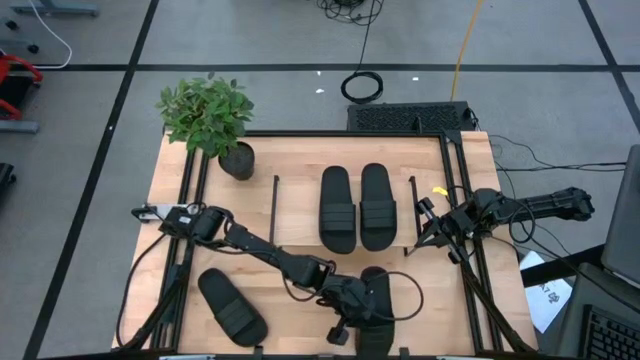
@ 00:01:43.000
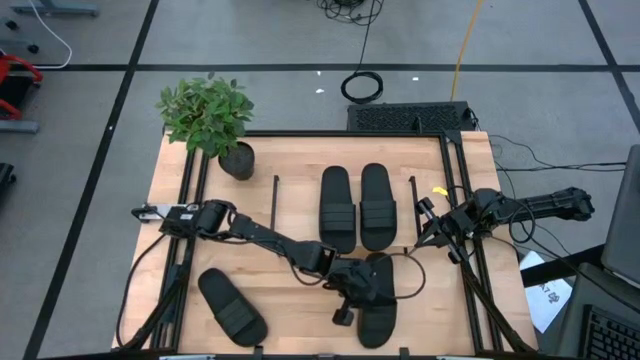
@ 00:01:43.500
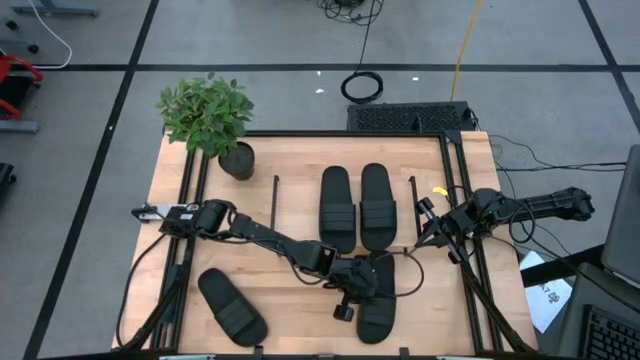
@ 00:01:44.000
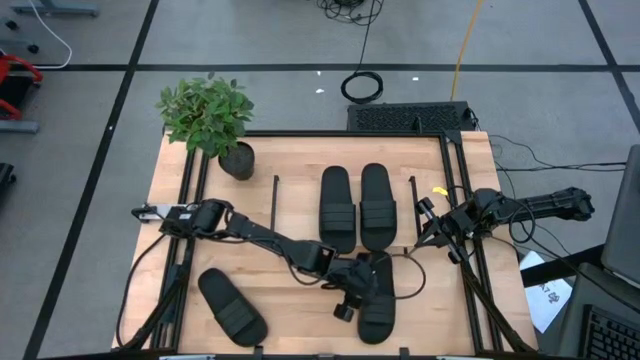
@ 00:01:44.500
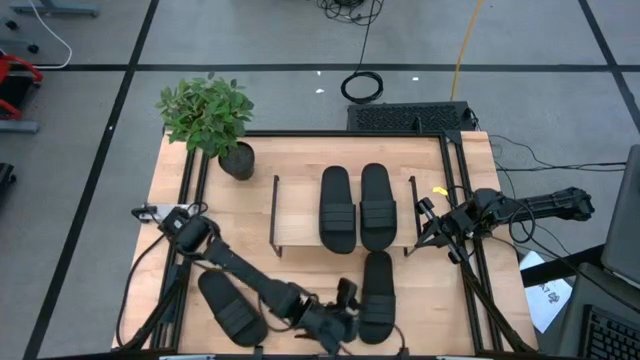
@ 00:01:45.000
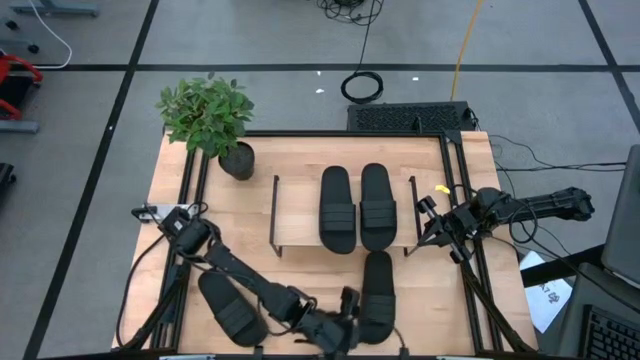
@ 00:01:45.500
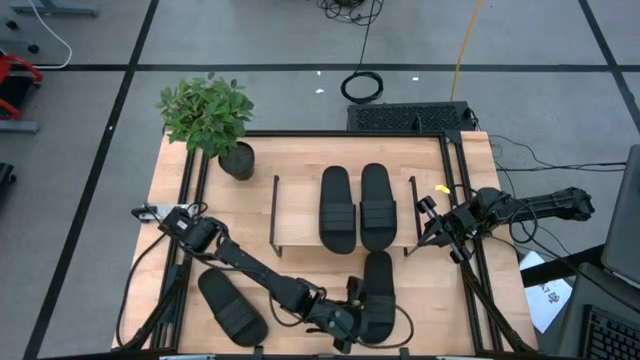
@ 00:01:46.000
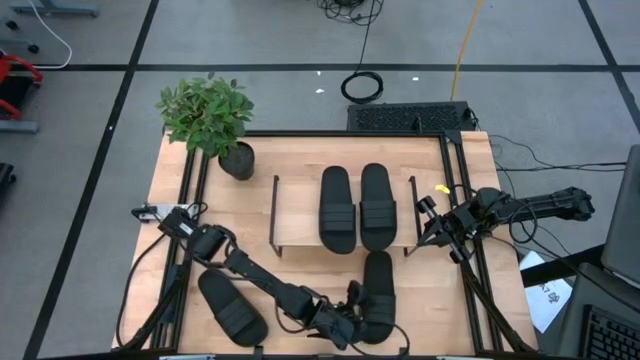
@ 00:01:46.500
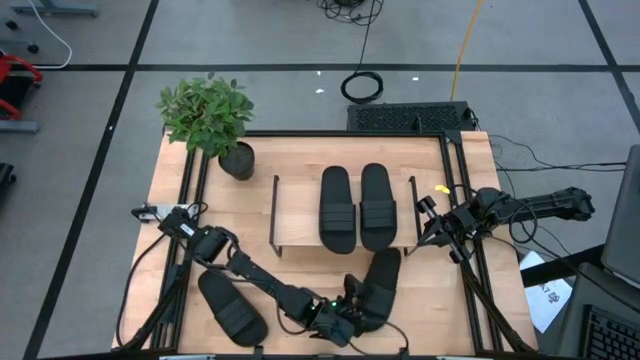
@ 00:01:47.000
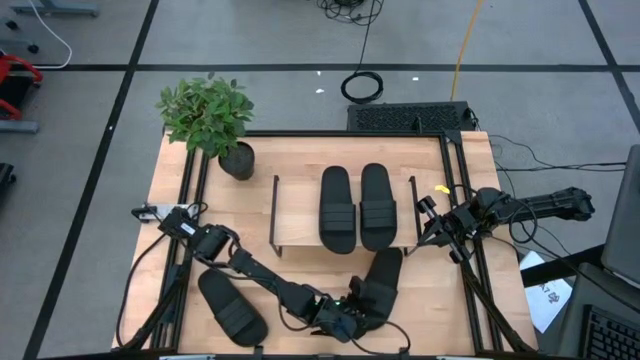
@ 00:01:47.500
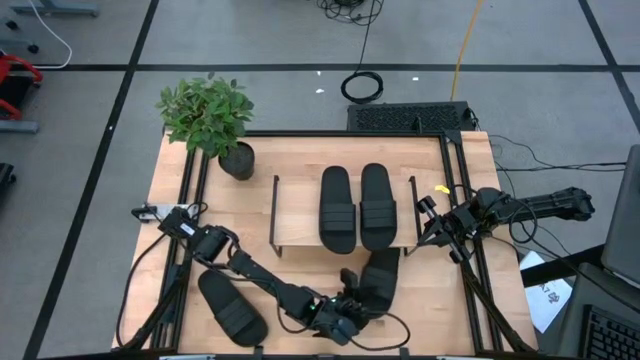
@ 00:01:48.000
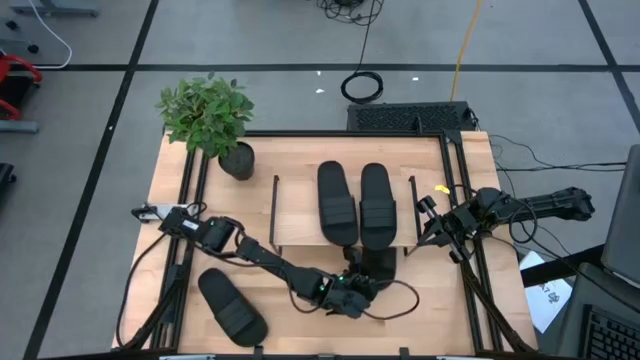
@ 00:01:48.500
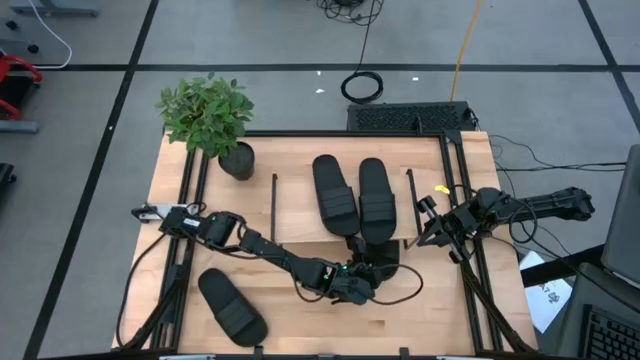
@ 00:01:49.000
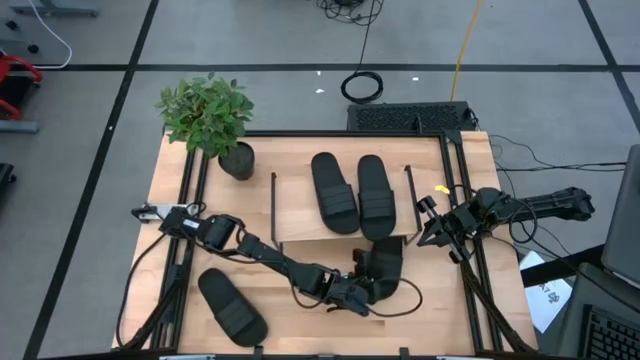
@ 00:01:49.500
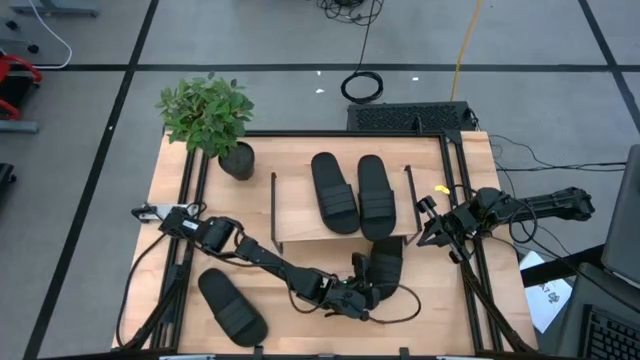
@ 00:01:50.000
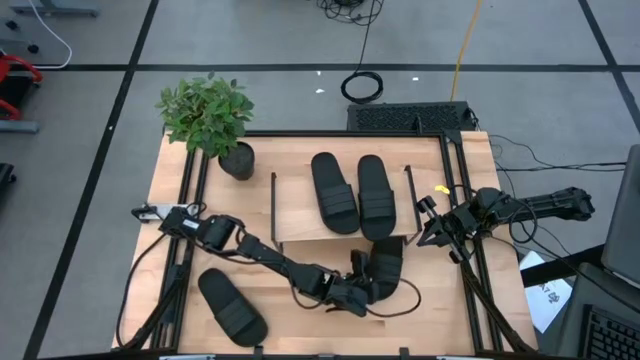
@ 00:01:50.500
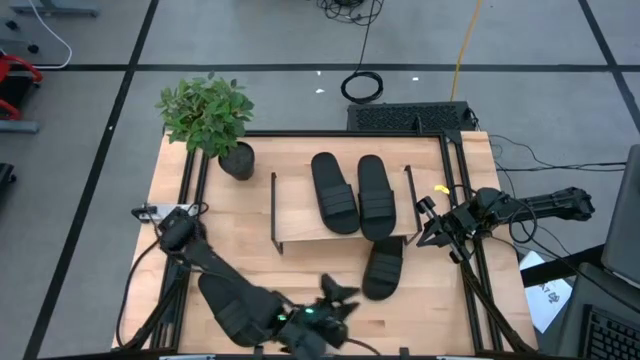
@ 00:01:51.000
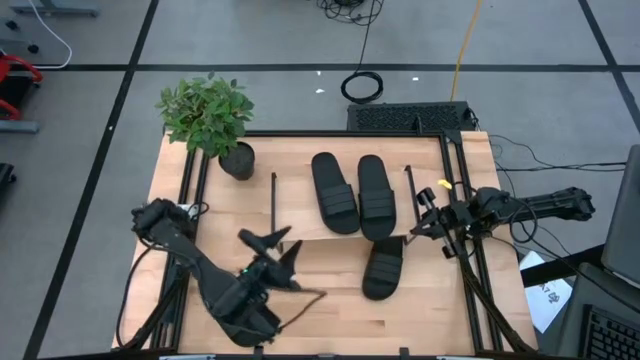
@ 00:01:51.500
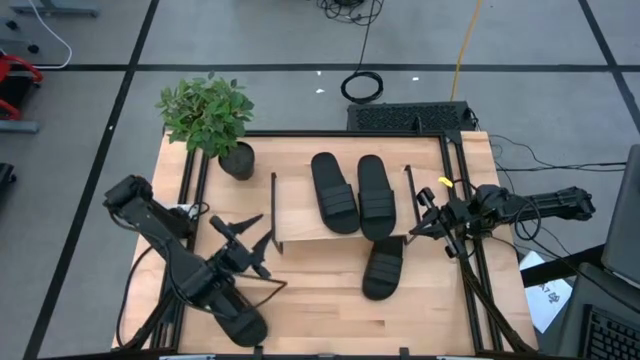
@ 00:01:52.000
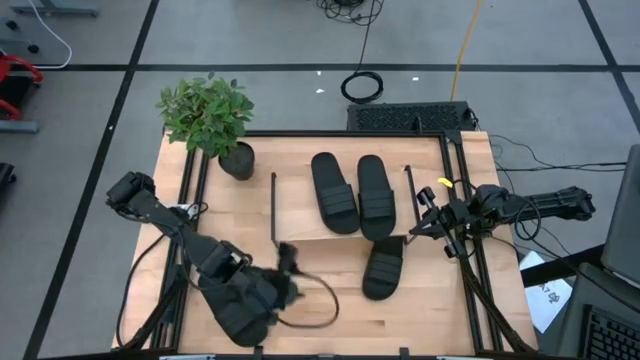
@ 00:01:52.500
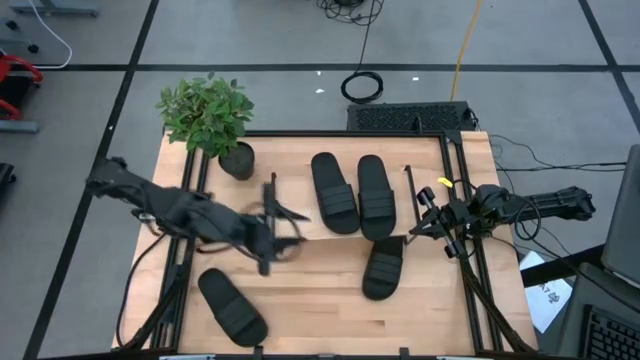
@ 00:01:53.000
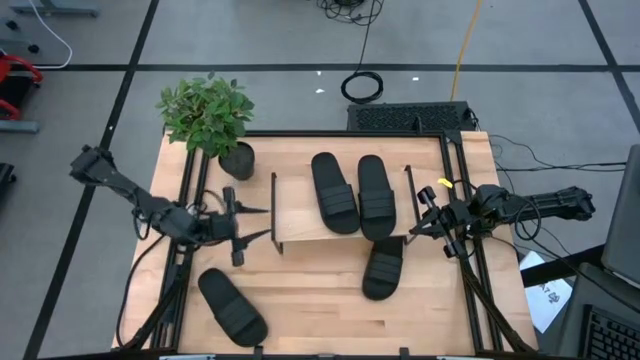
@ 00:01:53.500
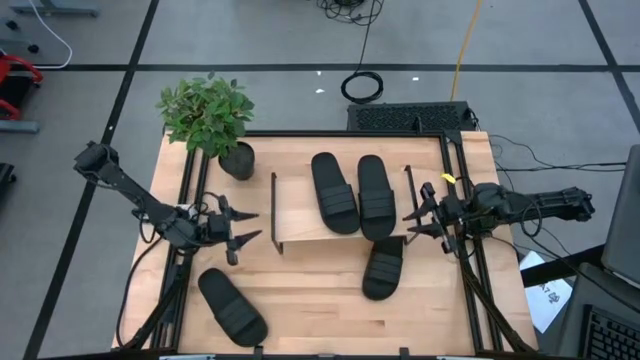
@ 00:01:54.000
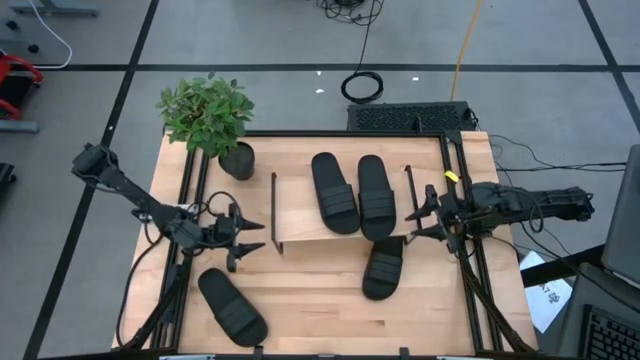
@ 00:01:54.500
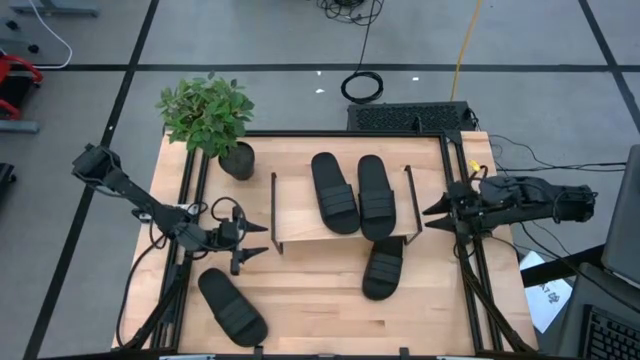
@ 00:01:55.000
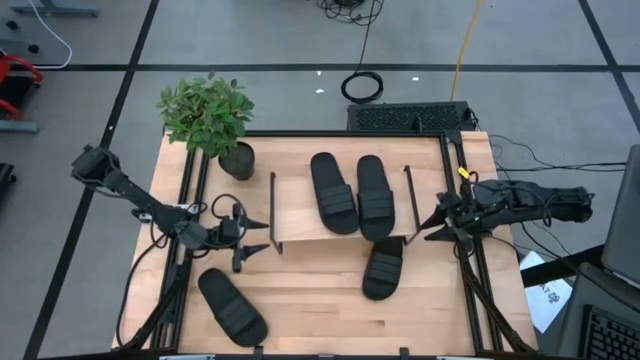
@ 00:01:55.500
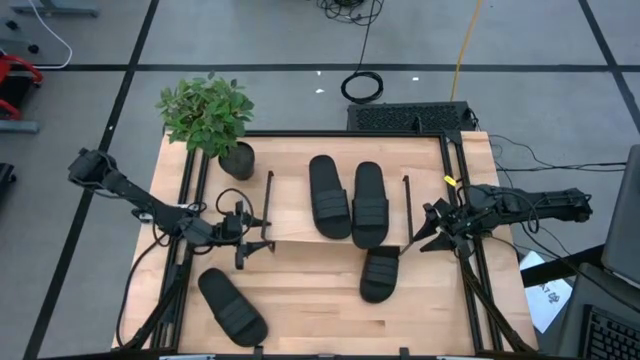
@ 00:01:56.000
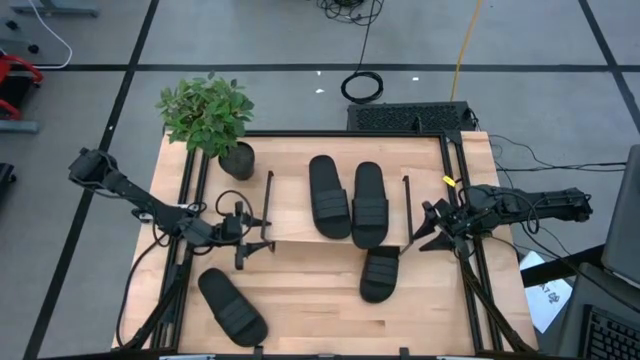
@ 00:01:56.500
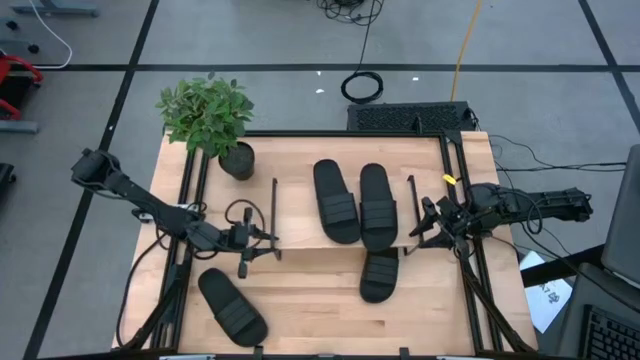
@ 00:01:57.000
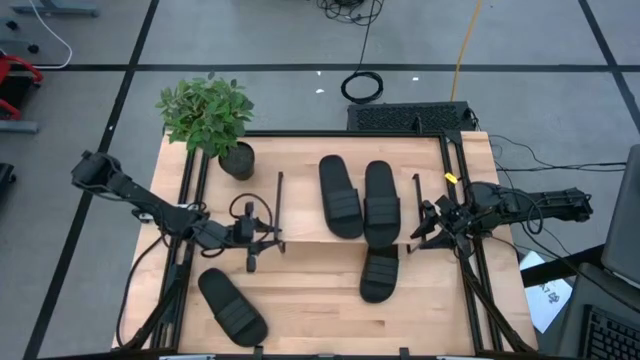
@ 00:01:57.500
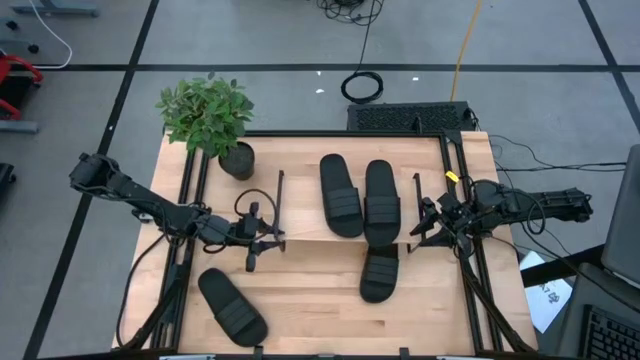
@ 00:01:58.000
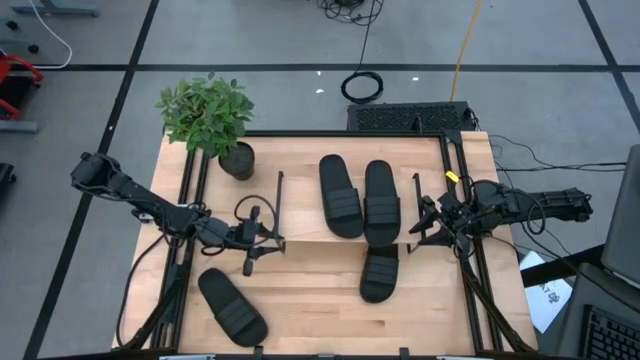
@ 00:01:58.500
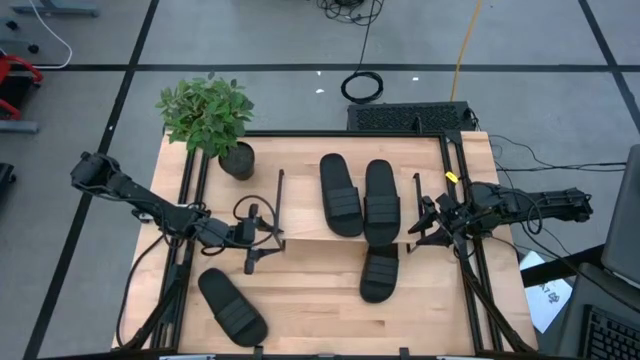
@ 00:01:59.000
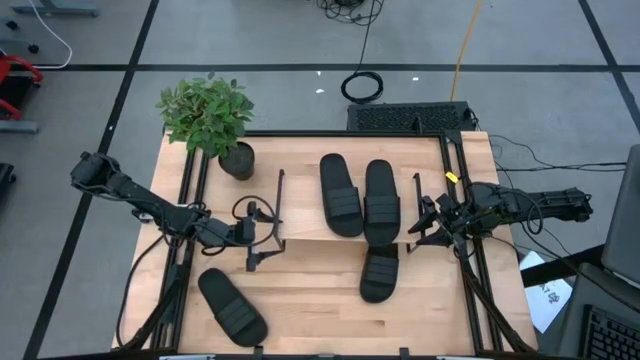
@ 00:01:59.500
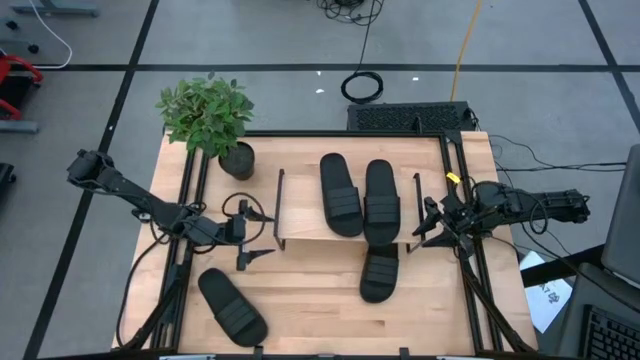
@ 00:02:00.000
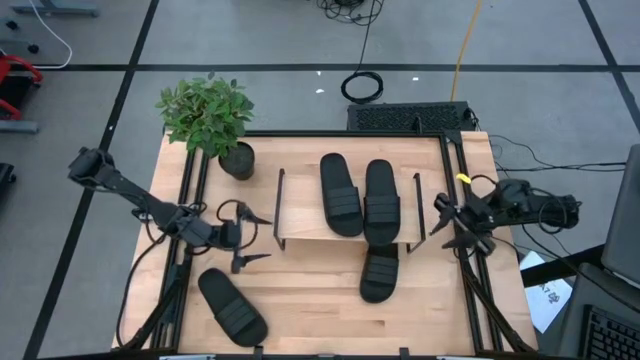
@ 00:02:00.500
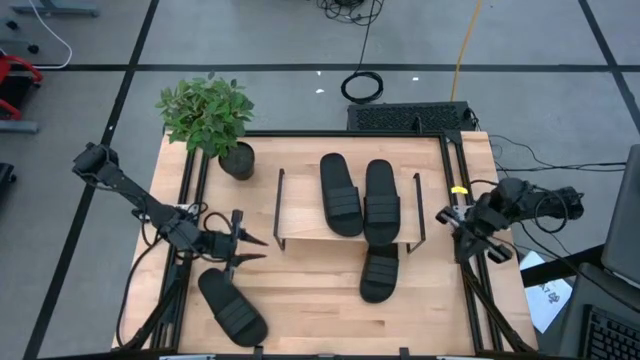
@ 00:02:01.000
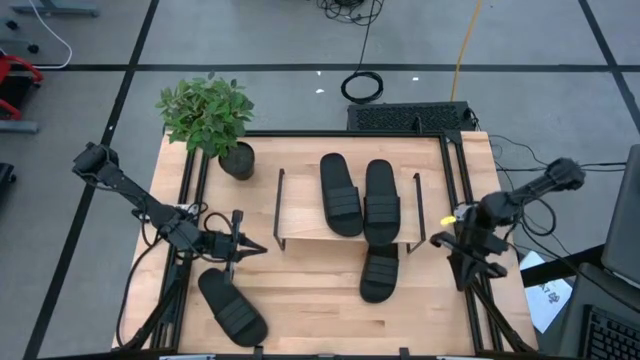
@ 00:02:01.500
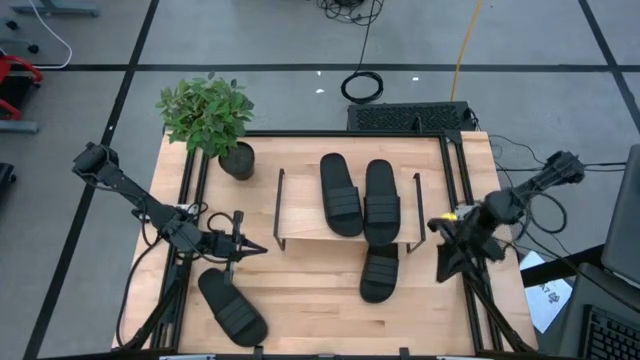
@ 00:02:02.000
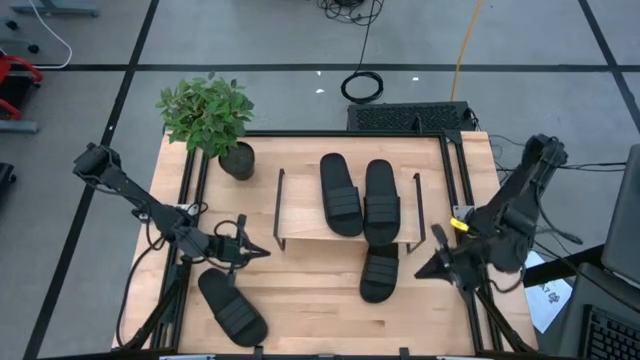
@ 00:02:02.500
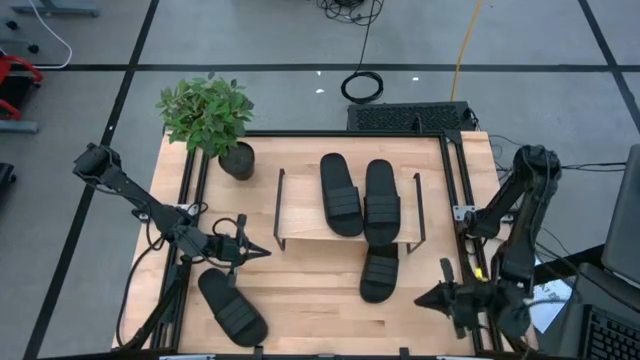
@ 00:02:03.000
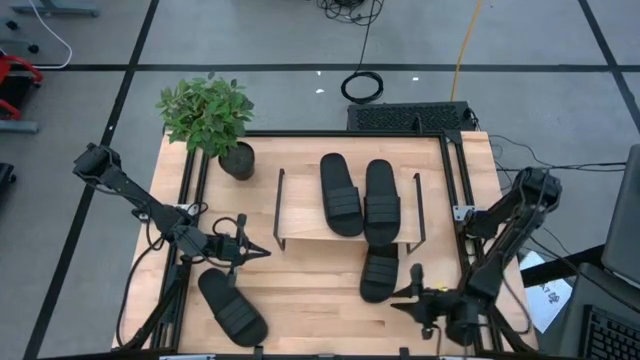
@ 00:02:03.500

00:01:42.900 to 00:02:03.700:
Task: Pick and place slides into the shelf
Put the black slide under the shelf
